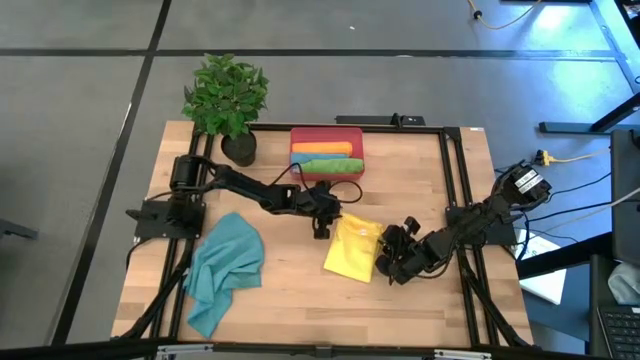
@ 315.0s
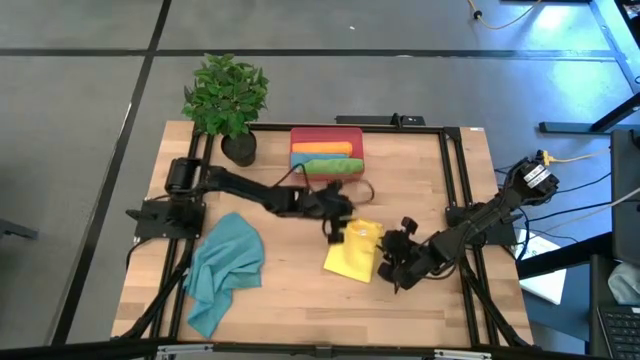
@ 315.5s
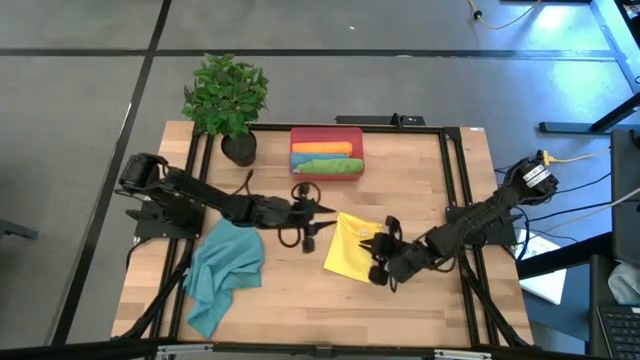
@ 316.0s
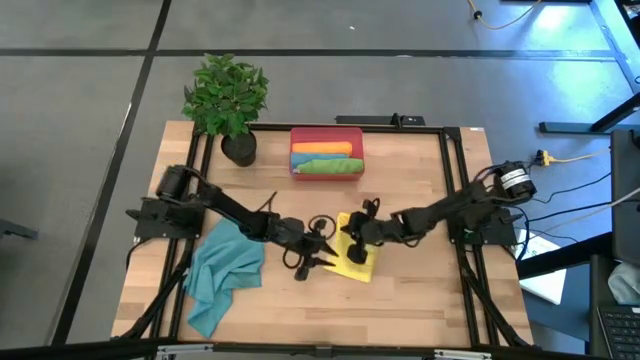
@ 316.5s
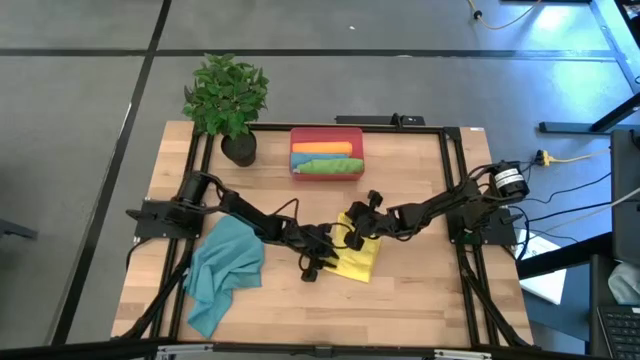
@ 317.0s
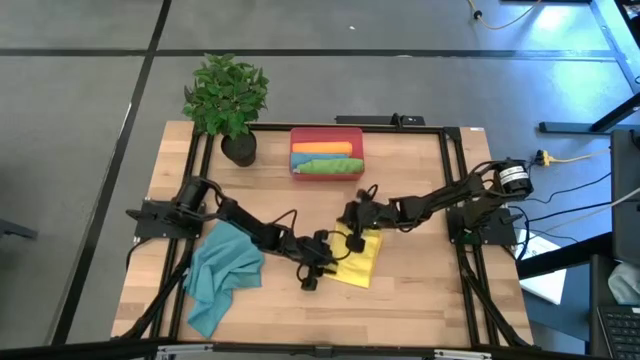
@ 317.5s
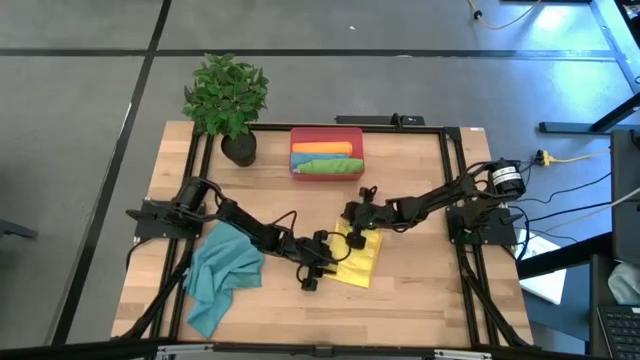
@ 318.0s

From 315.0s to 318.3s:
Task: Roll microfiber towels into tight, uniform cylinder then place into a basket
Fold the yellow towel

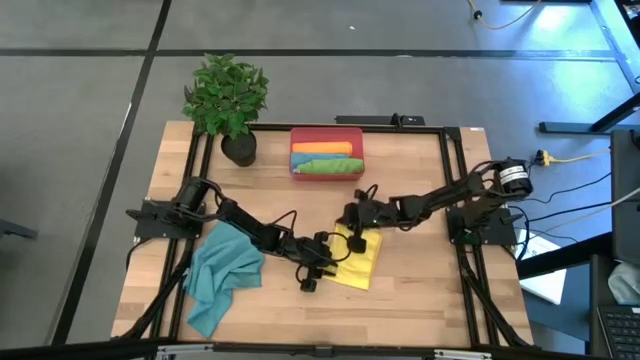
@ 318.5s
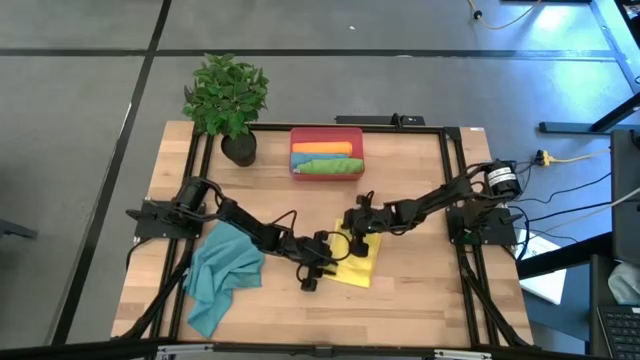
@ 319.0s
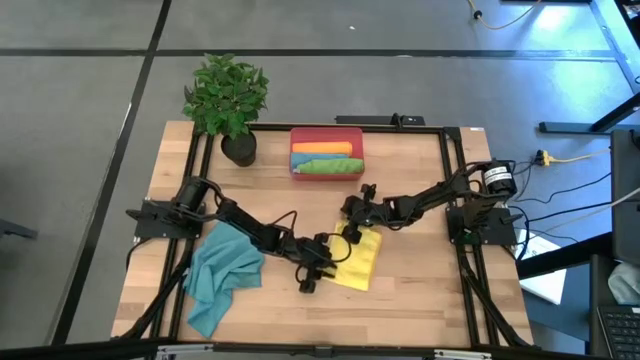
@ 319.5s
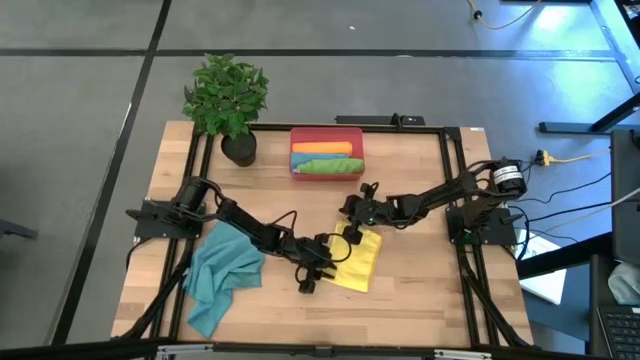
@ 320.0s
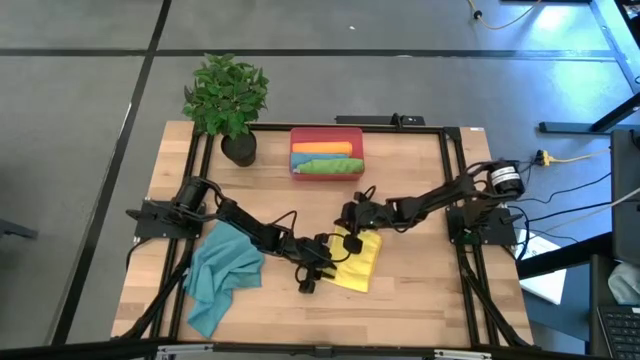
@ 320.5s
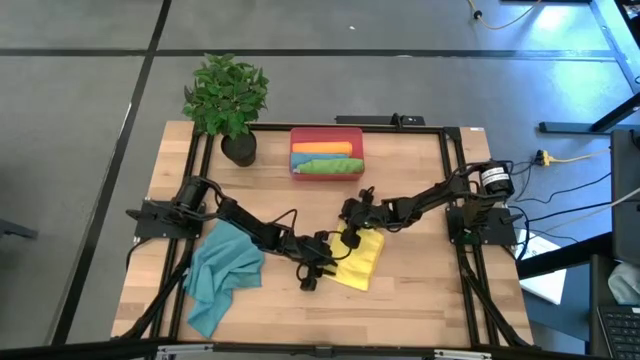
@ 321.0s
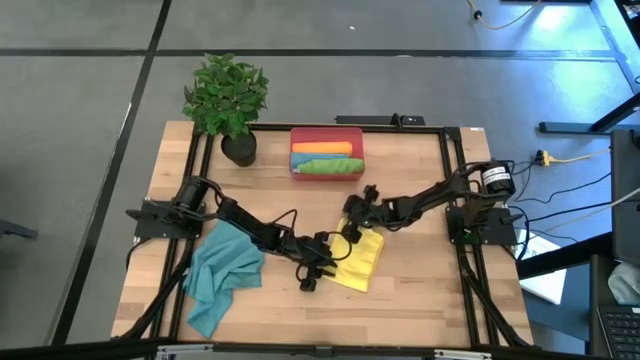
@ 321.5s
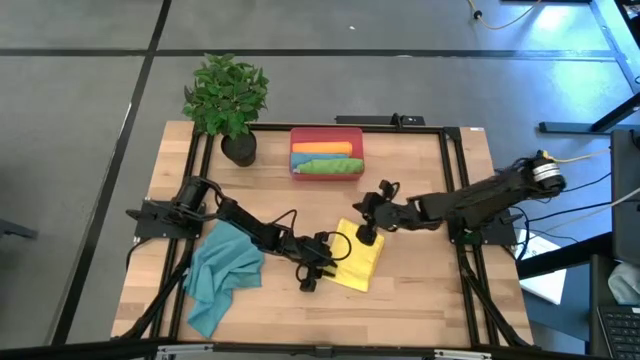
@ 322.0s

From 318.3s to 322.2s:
Fold the yellow towel

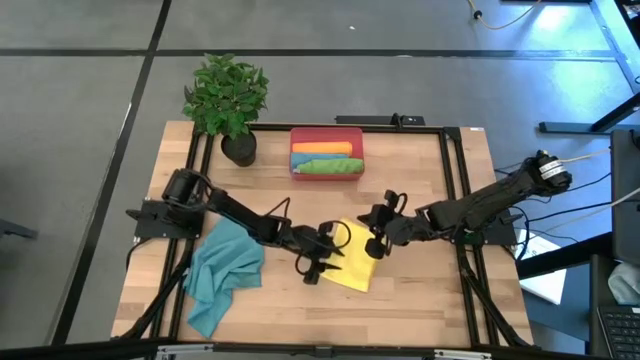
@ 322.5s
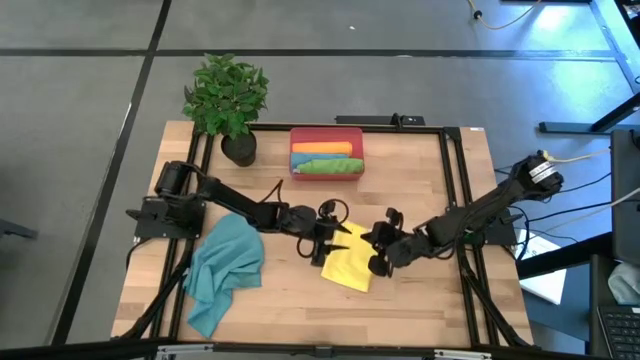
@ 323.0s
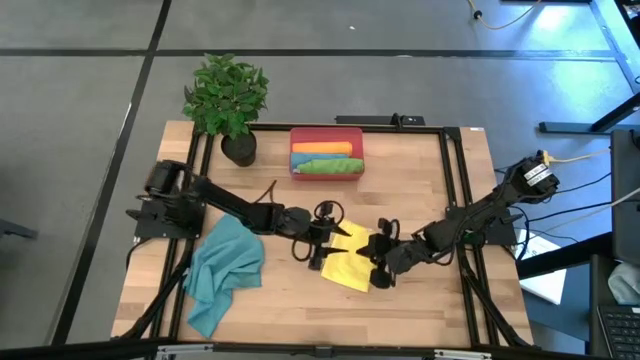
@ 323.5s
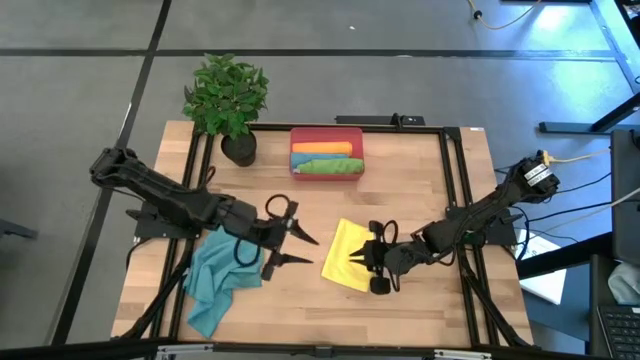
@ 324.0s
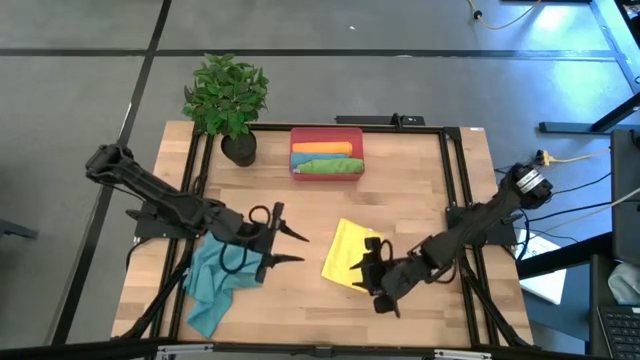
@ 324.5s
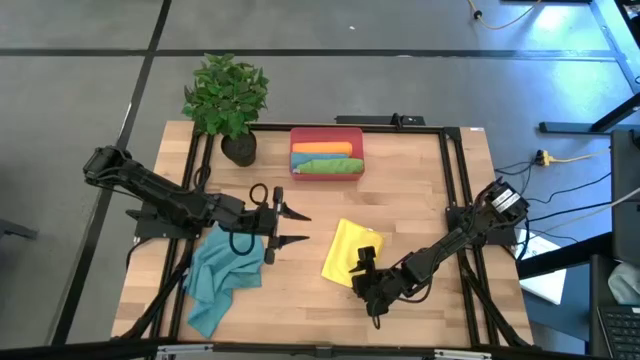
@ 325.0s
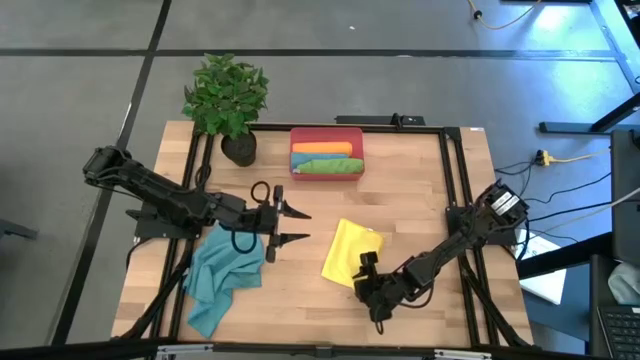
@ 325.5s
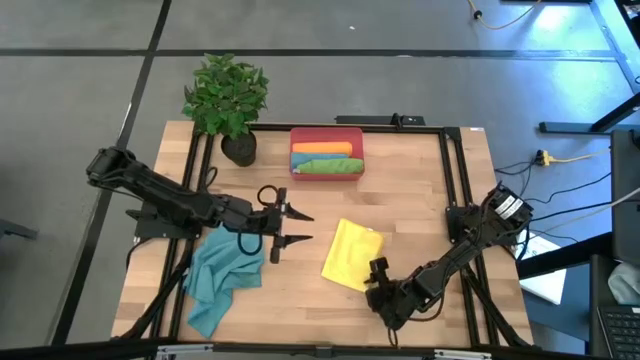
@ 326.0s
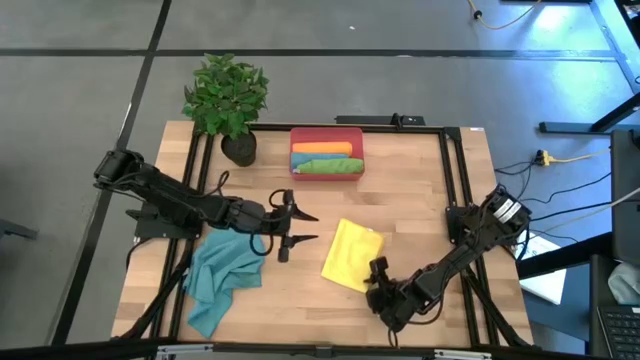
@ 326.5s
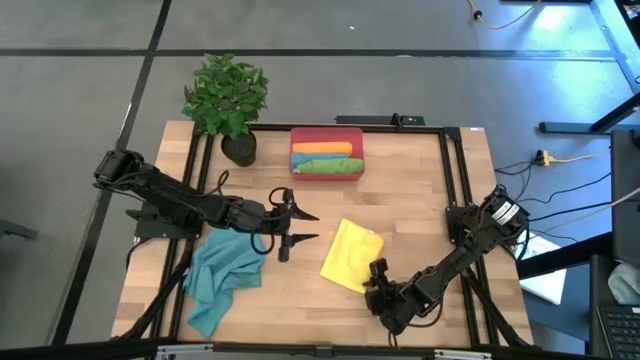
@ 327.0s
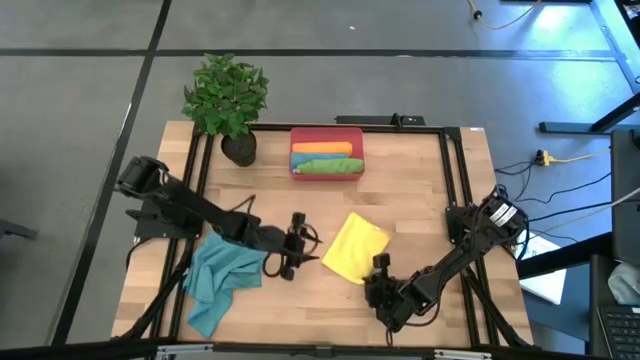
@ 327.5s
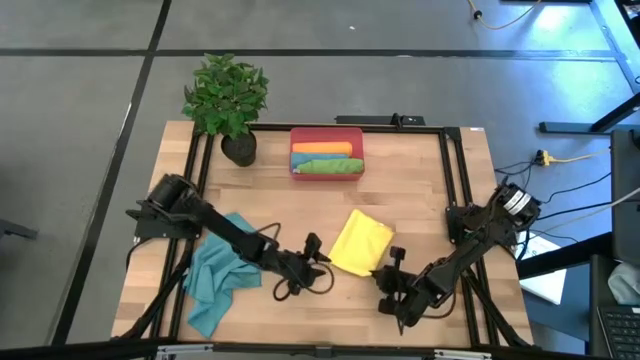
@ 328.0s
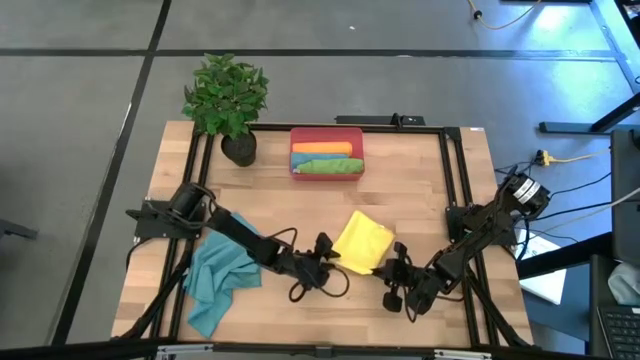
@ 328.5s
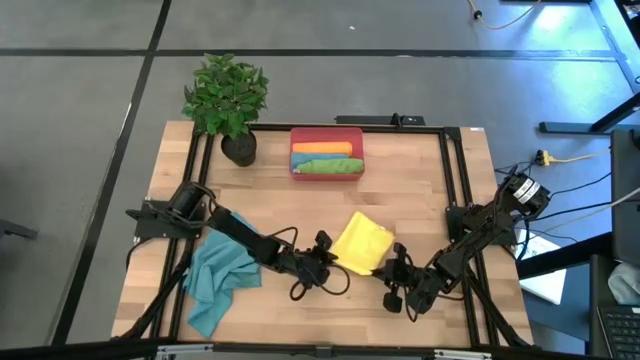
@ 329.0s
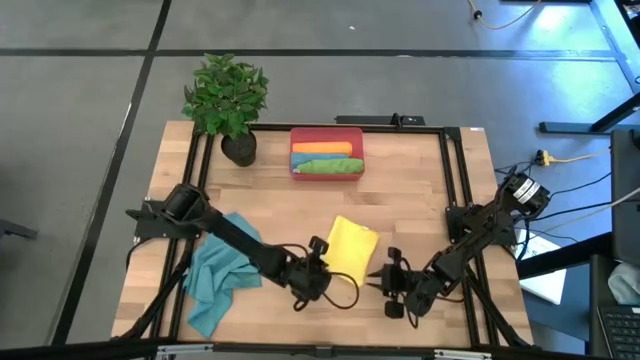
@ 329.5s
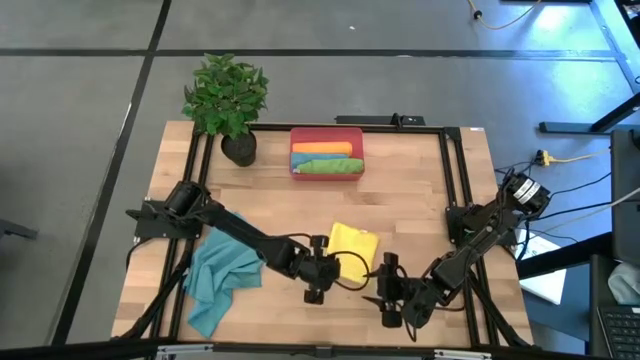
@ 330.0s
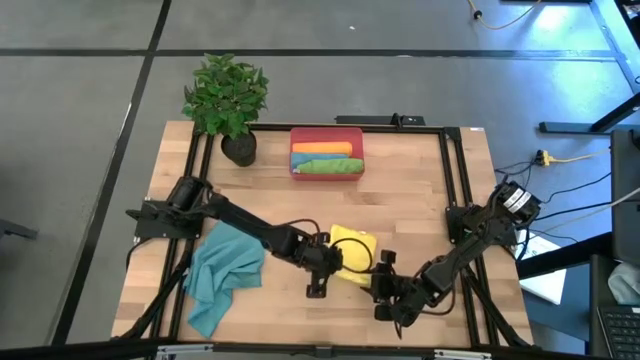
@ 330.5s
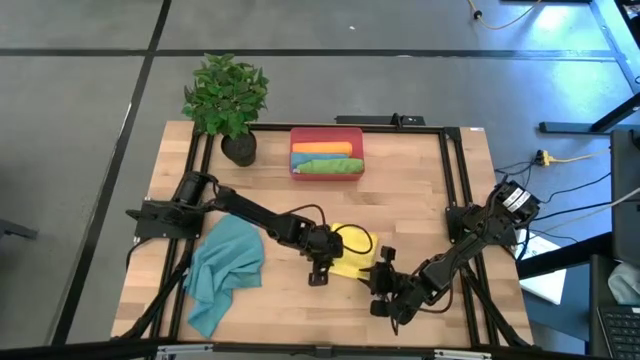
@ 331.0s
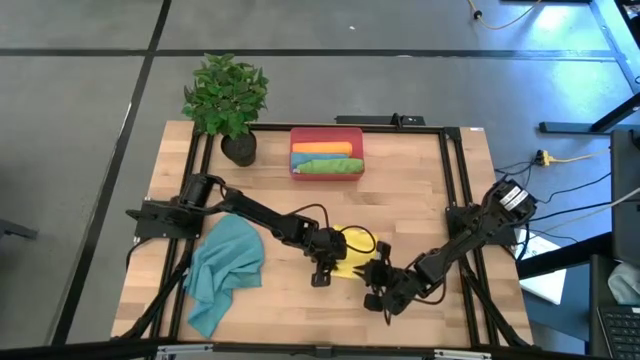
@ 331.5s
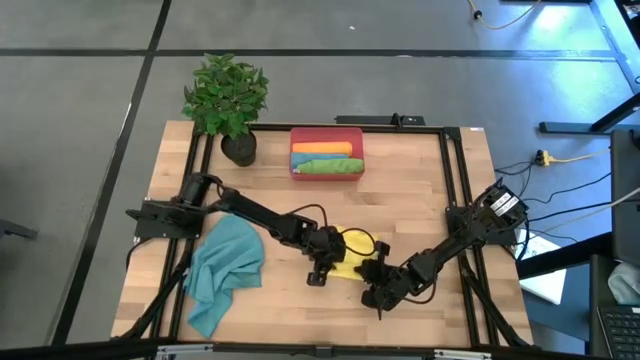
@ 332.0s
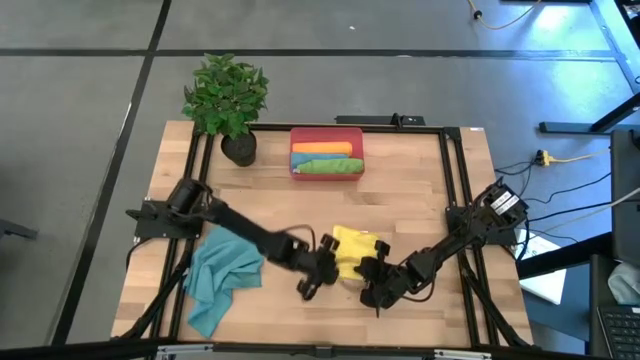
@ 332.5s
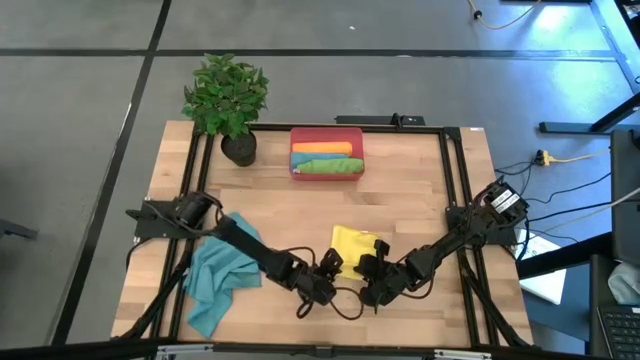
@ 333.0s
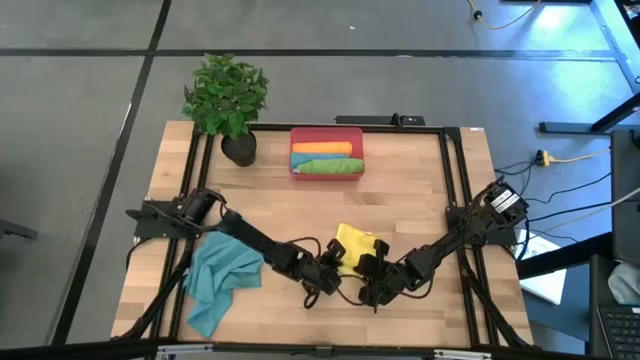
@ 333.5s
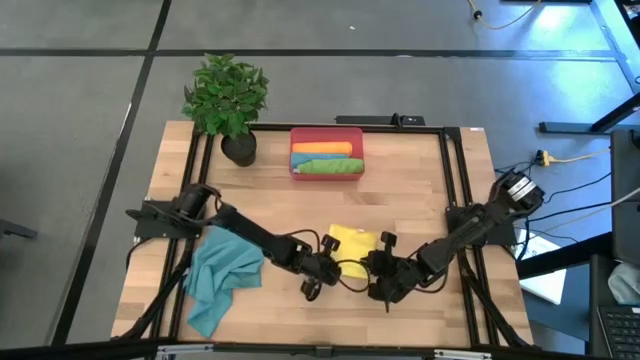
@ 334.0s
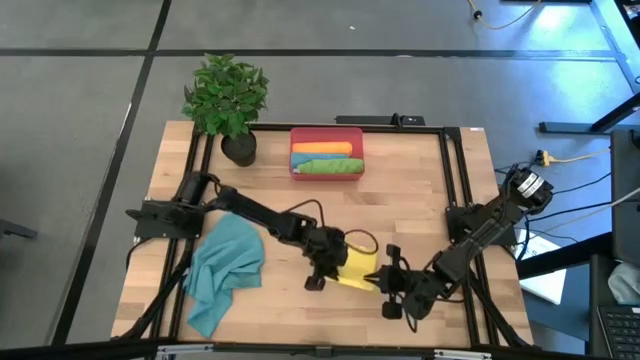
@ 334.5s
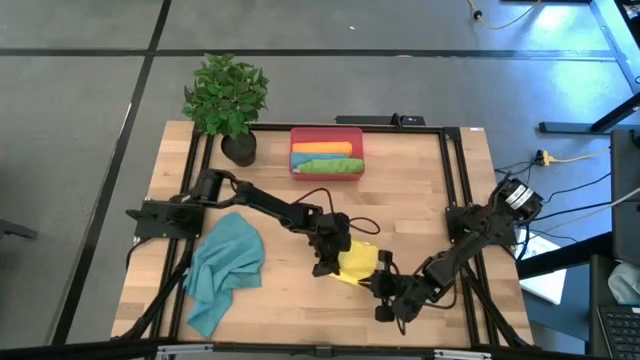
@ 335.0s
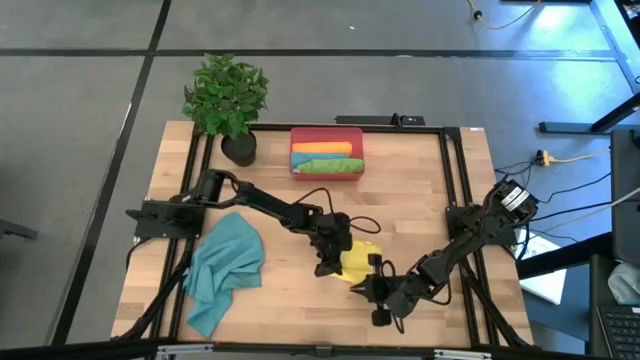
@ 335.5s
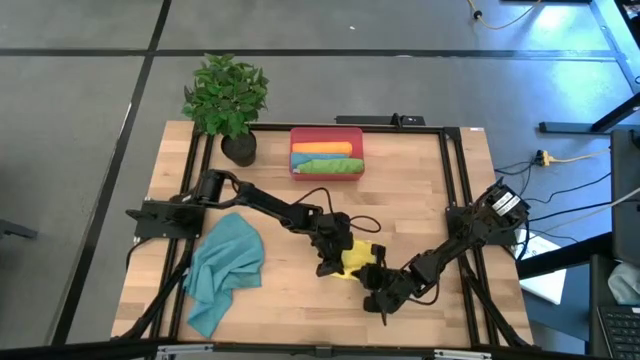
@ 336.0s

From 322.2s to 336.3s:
Roll the yellow towel

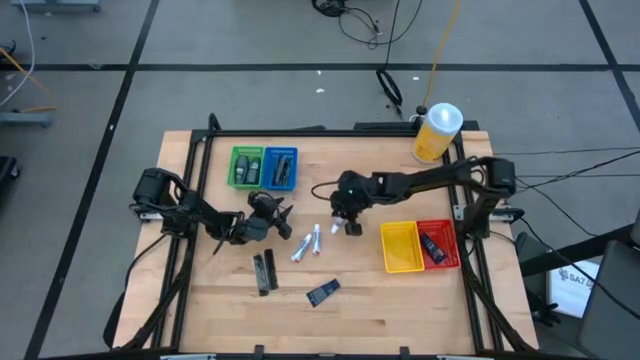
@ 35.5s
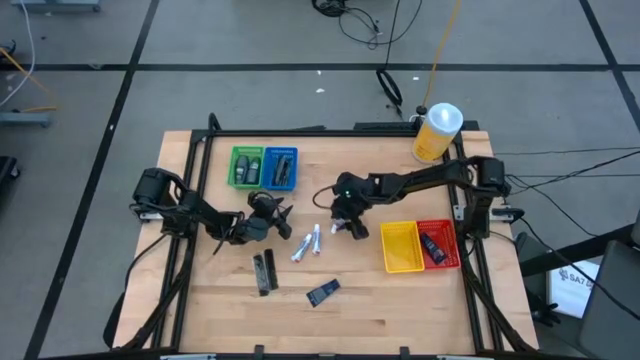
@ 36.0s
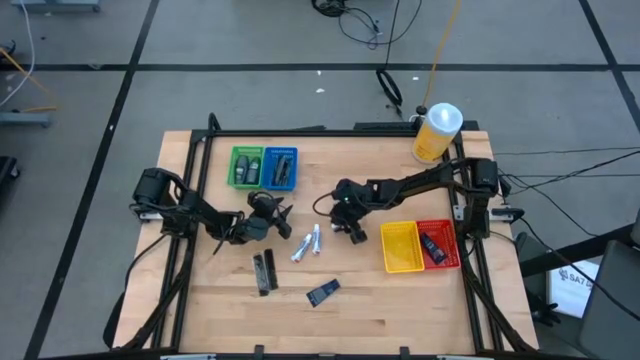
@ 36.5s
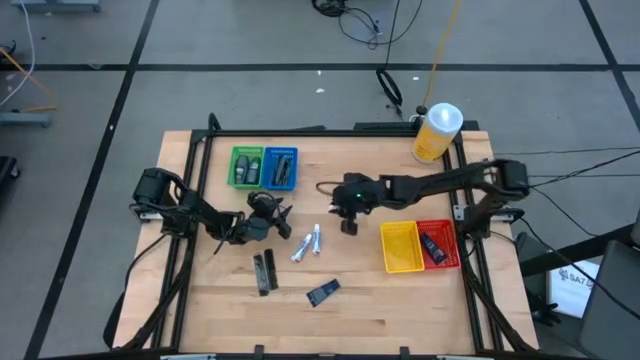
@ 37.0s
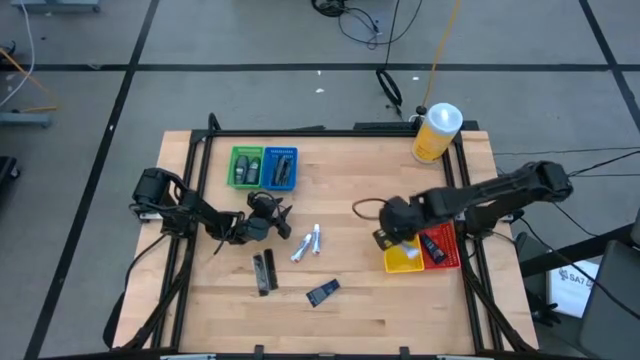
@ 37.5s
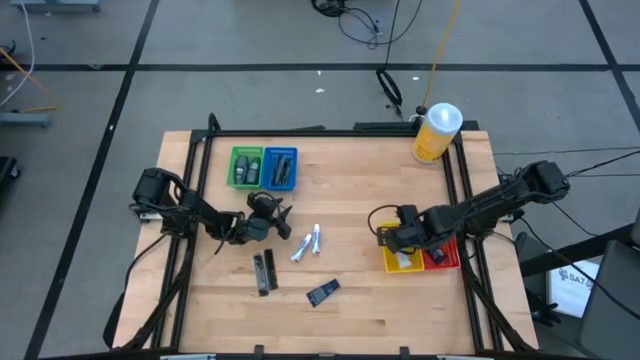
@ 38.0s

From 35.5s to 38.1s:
Task: Pick & Place Travel size toiletries
Put the white toothpaste into the yellow bin
